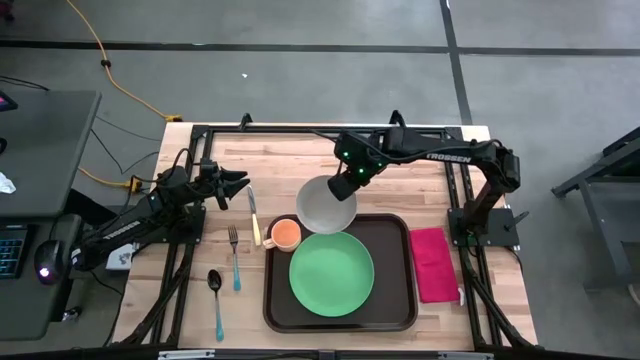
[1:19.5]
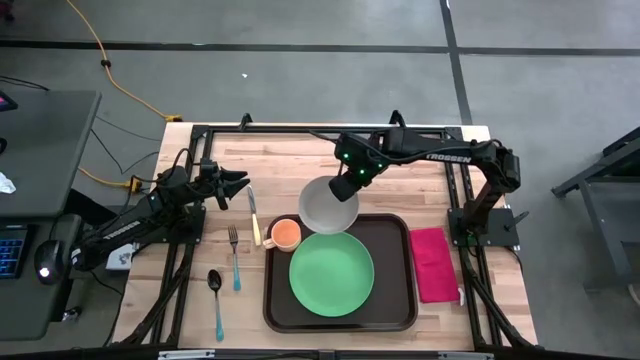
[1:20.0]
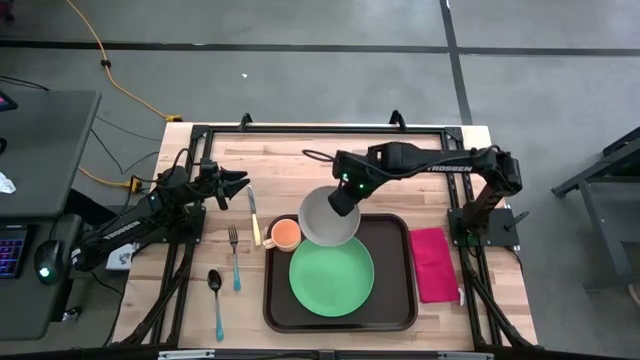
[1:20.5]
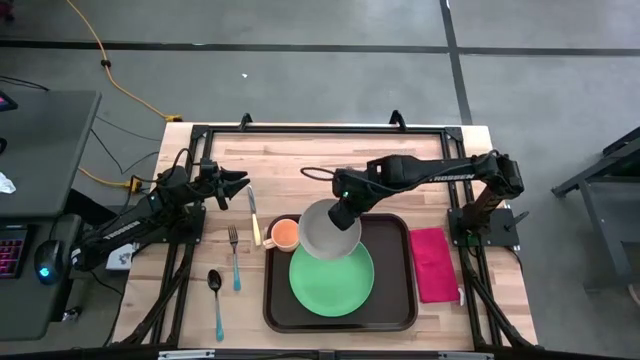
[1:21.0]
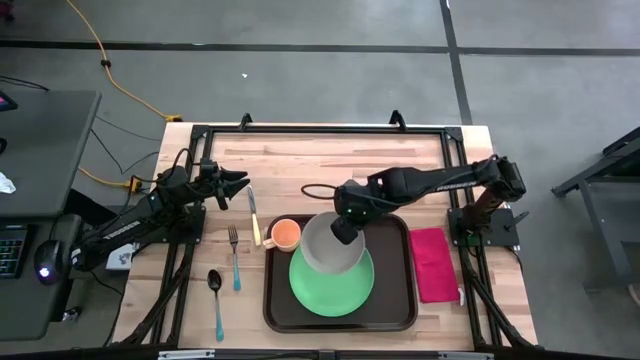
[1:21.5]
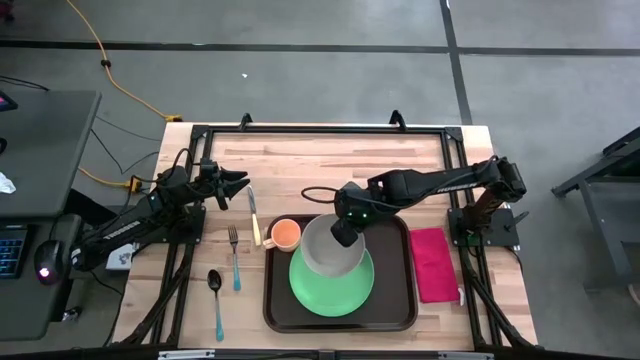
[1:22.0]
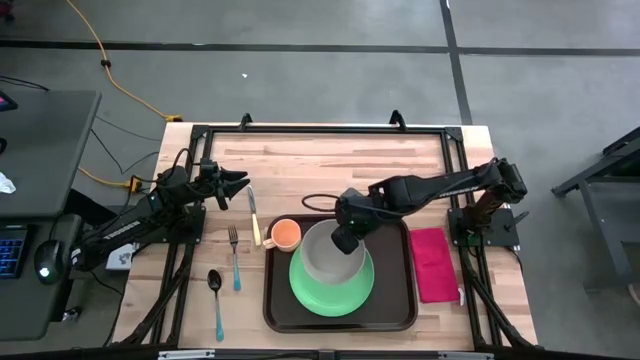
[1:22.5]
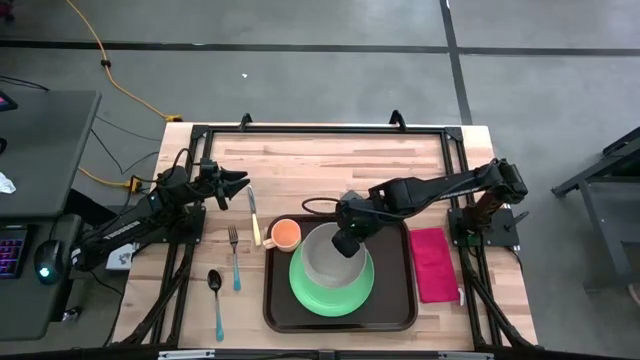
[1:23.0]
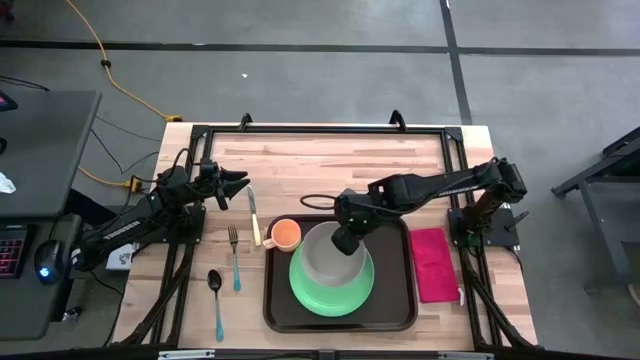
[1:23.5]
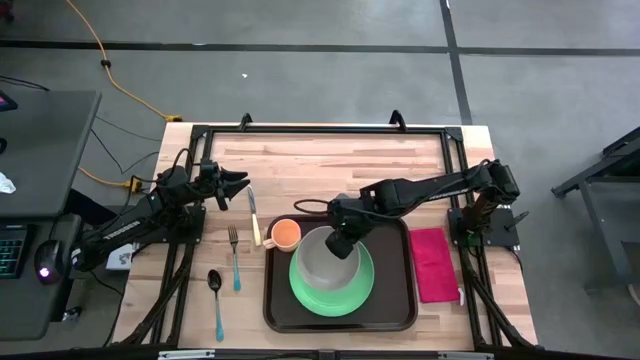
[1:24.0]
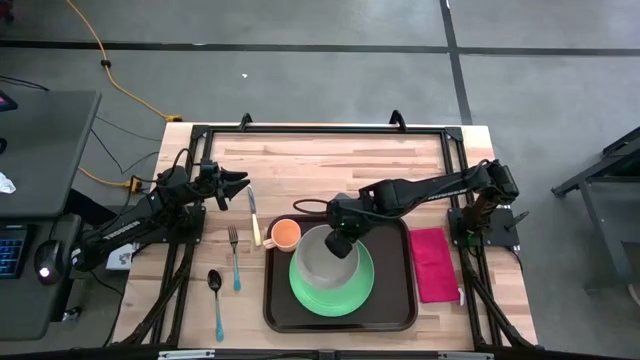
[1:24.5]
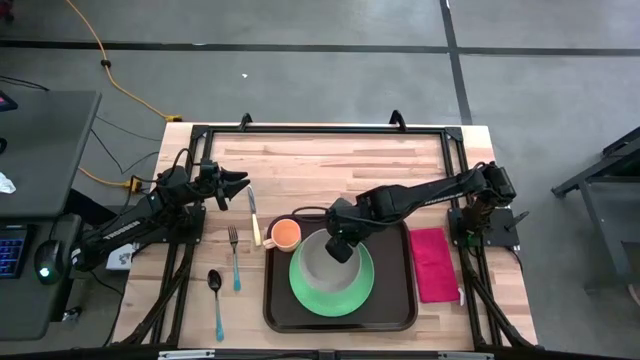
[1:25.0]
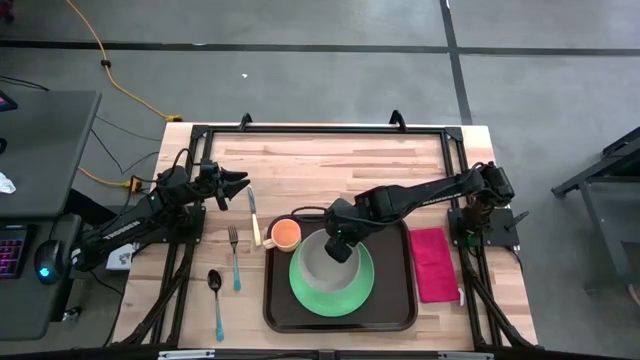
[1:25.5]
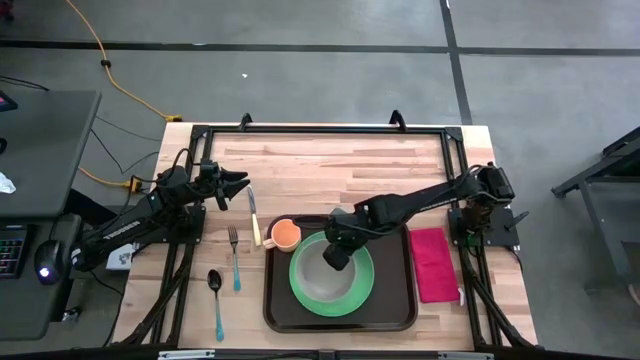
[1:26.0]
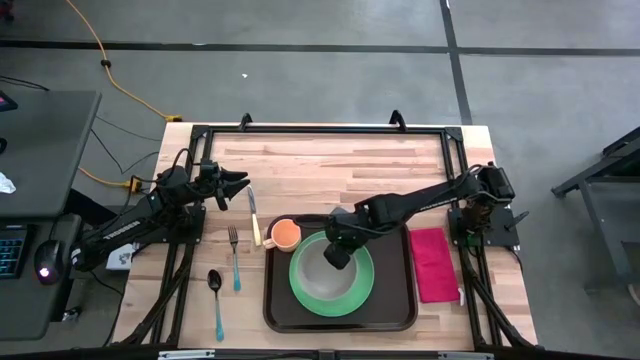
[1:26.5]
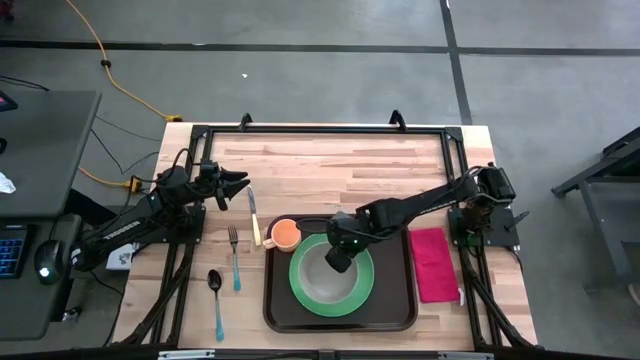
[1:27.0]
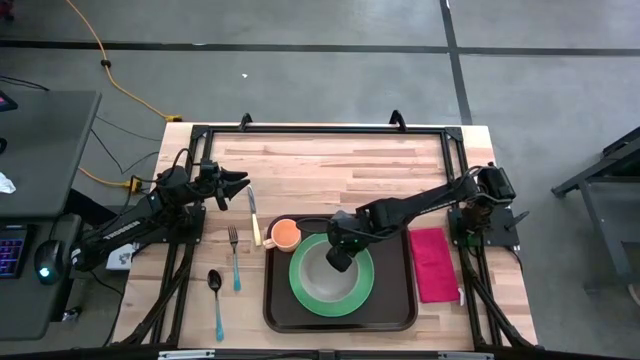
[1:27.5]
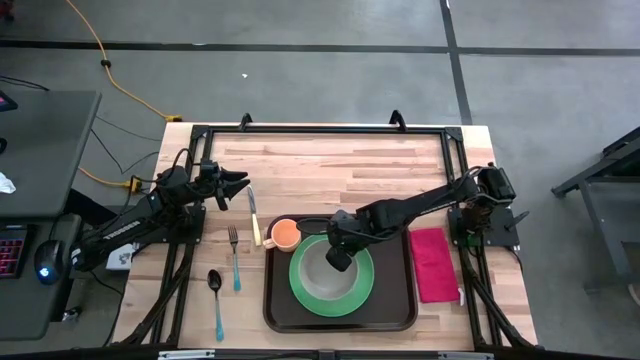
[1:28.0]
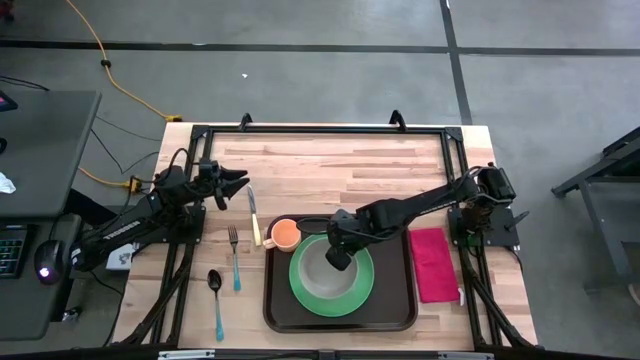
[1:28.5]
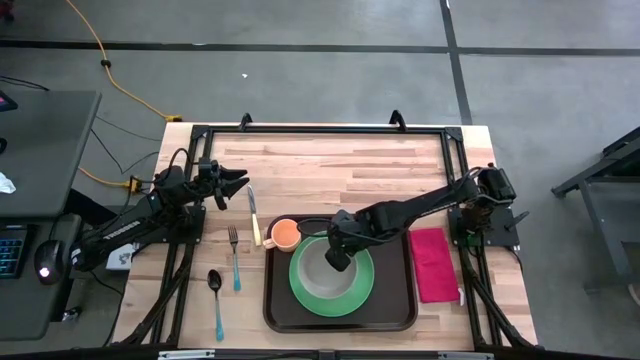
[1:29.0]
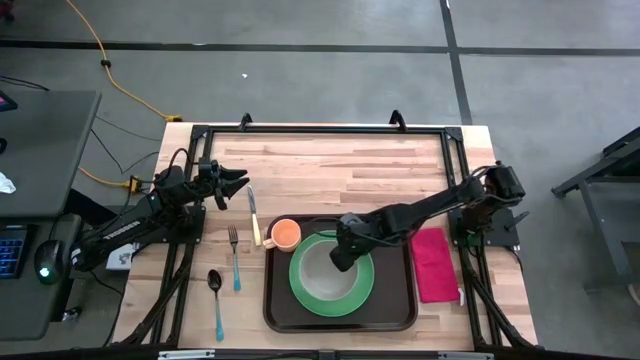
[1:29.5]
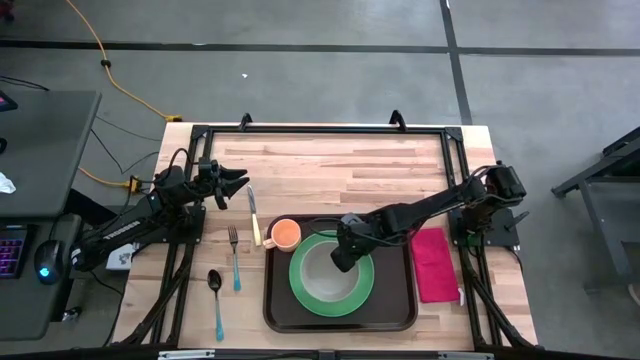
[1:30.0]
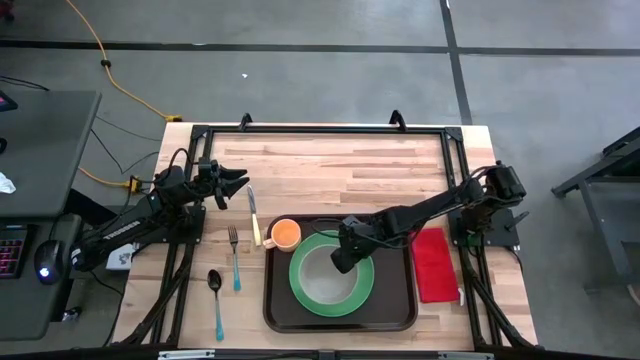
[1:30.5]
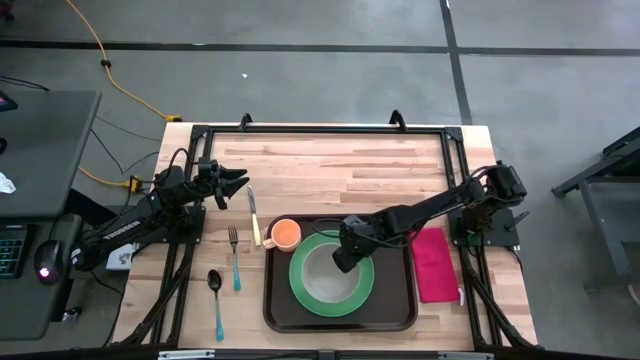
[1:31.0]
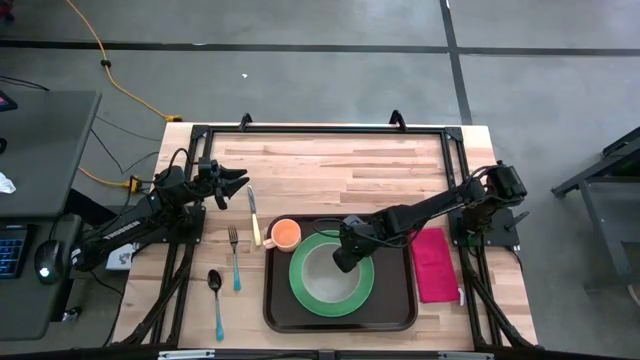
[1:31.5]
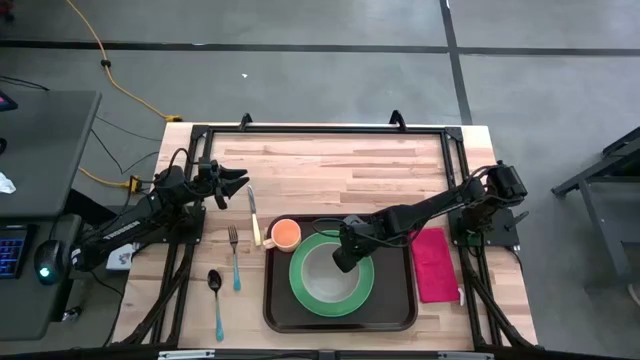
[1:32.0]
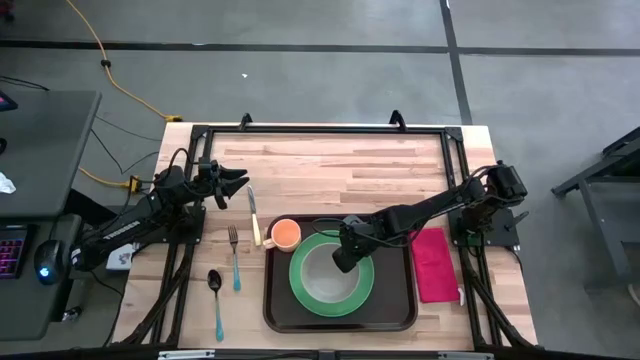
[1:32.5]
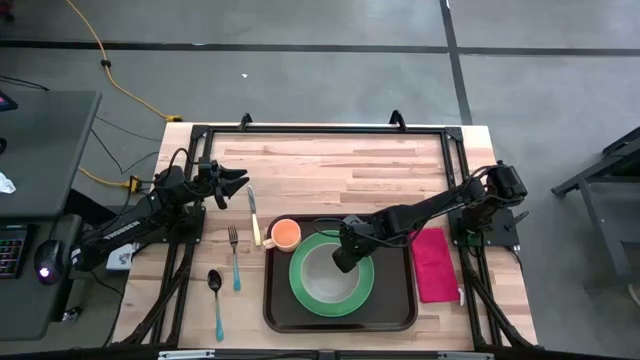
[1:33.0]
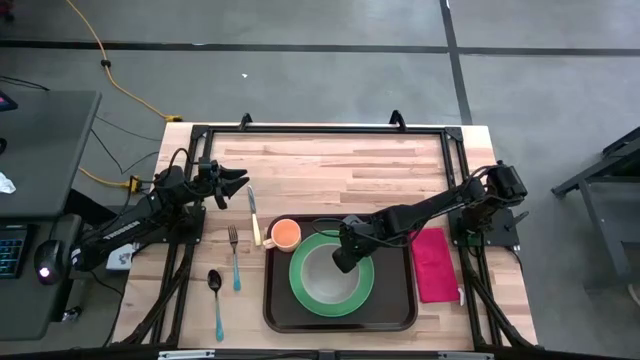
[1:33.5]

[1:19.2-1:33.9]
Task: Set up tray
Put the white bowl on top of the green plate on the black tray

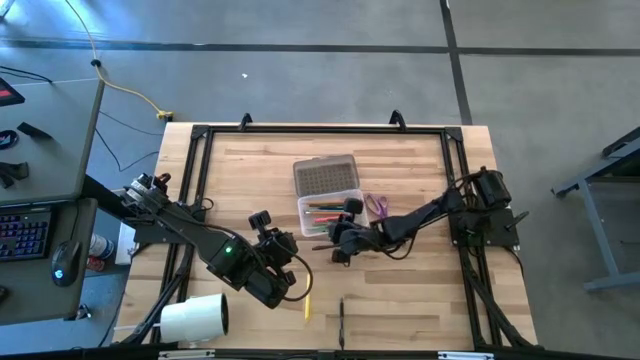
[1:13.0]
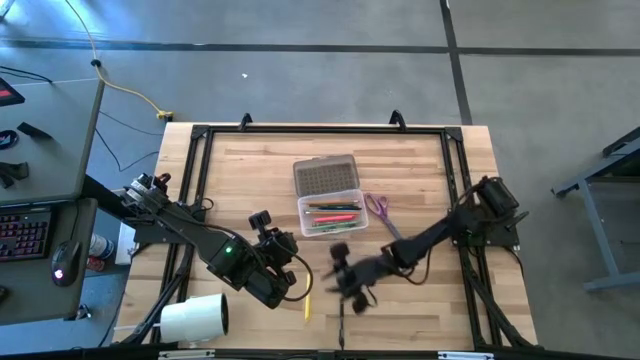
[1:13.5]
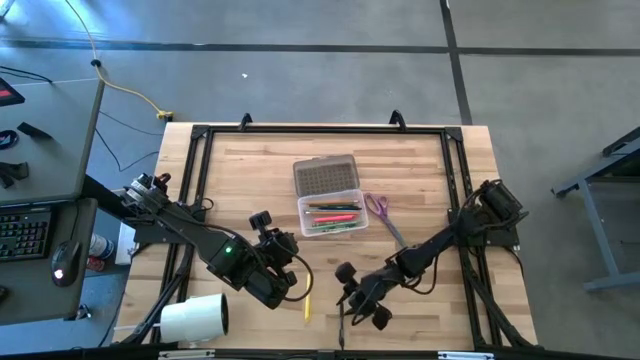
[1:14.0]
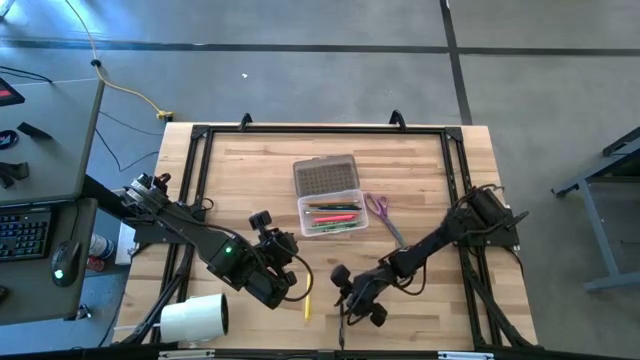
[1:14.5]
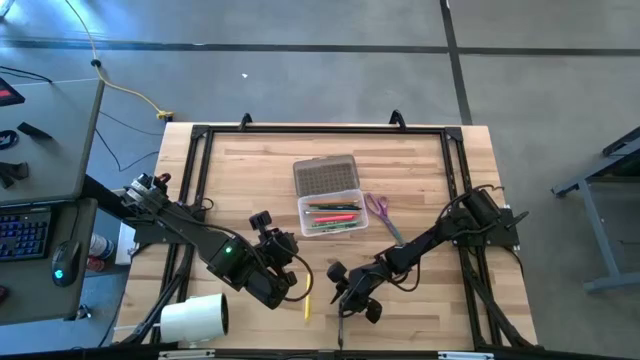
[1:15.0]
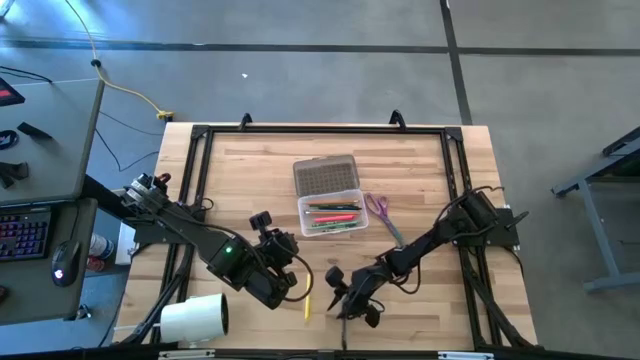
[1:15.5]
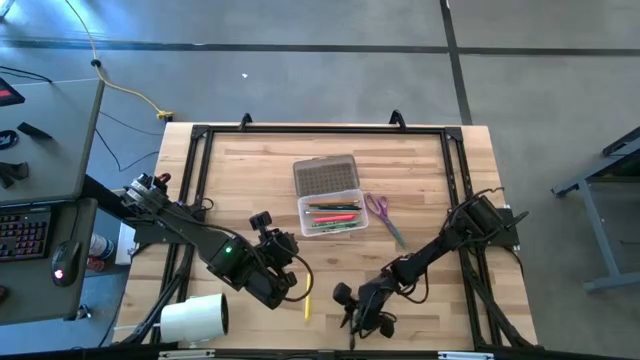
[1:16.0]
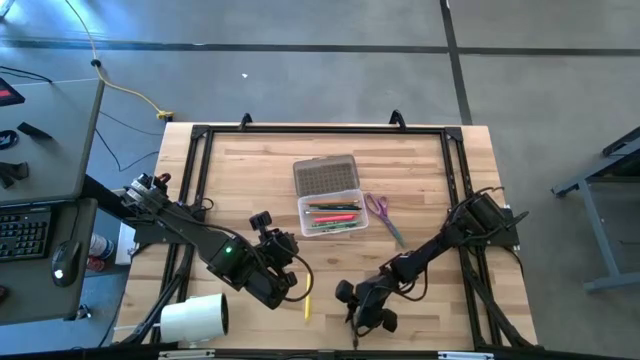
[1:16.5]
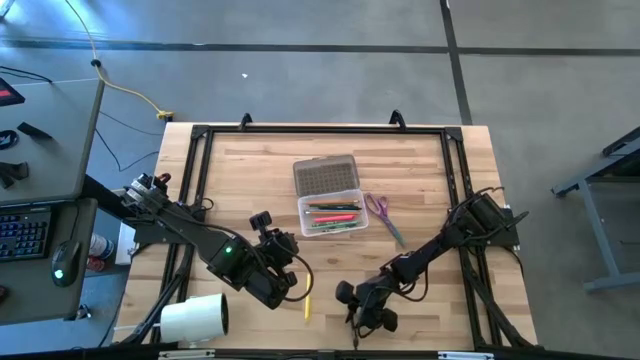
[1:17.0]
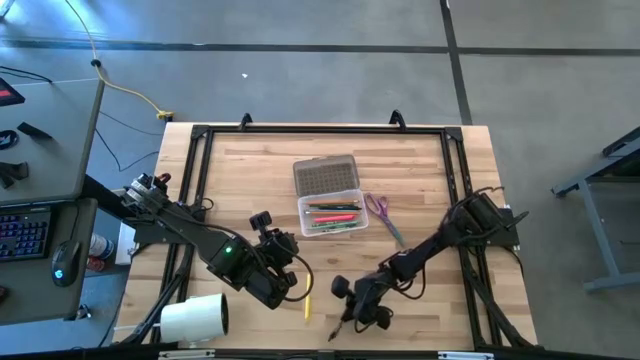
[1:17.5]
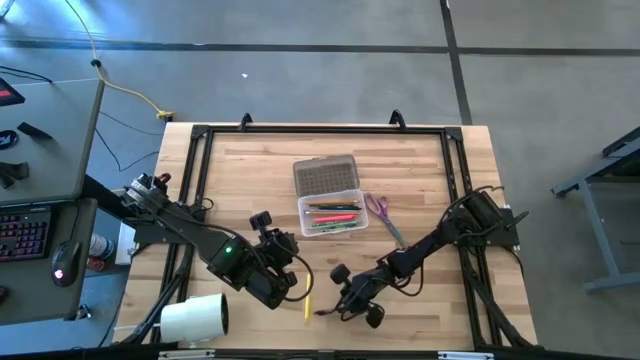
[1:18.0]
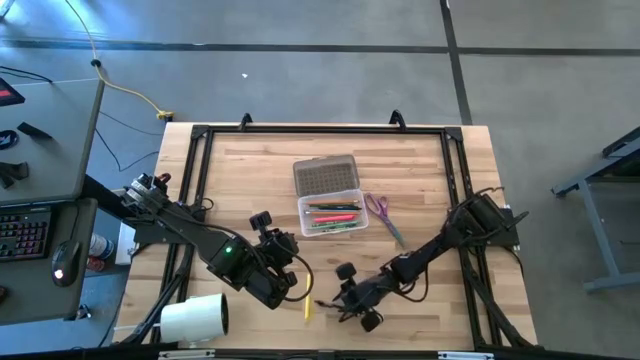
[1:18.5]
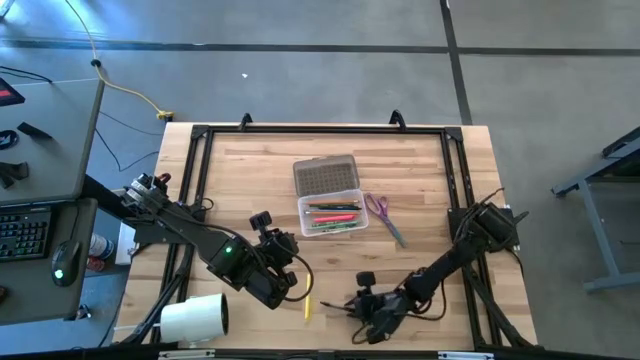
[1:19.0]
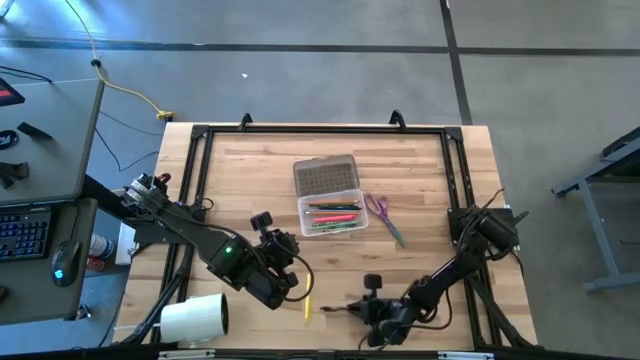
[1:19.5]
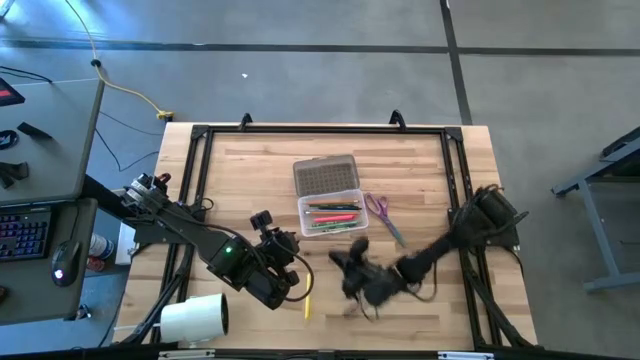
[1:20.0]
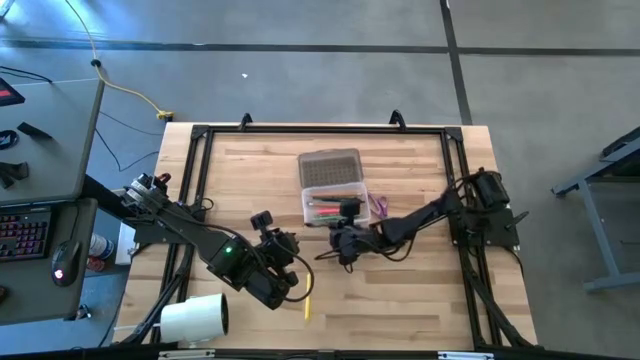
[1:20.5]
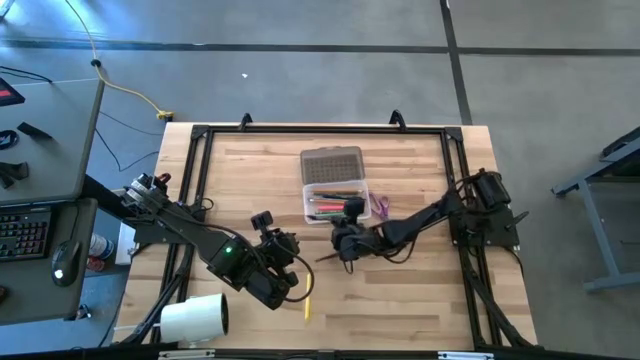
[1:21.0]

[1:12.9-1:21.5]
Task: Pick & place school supplies into a supply box
Put the transparent pen into the black supply box
